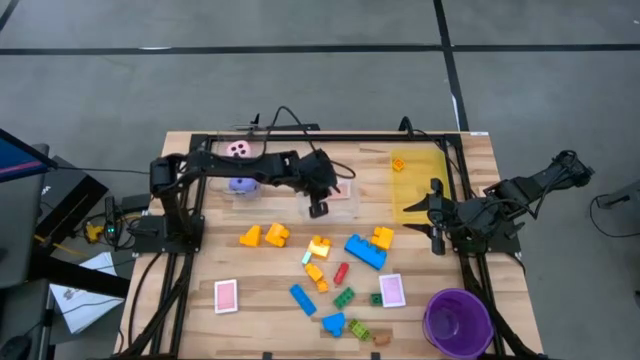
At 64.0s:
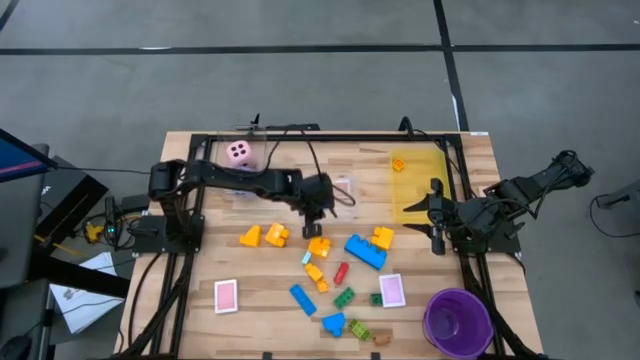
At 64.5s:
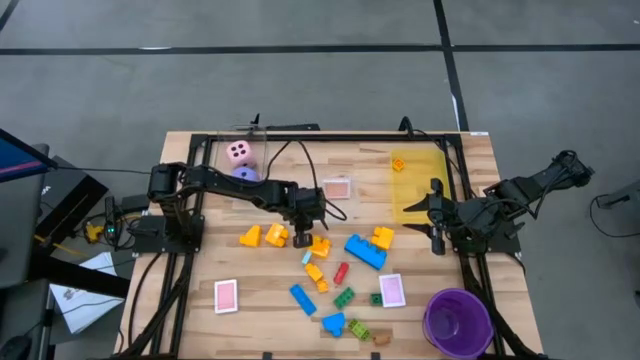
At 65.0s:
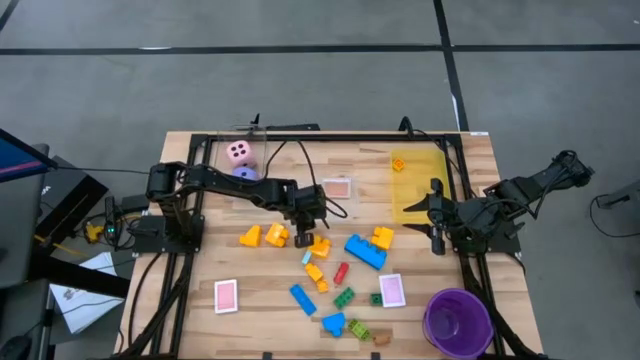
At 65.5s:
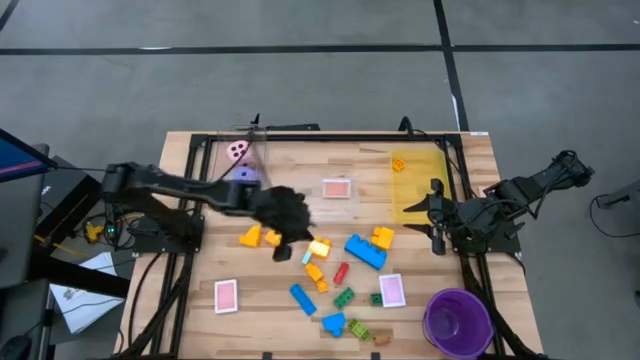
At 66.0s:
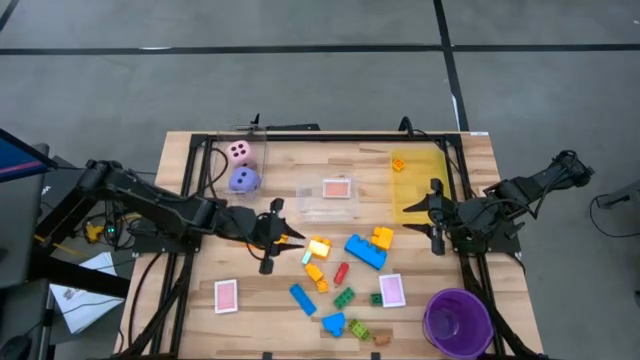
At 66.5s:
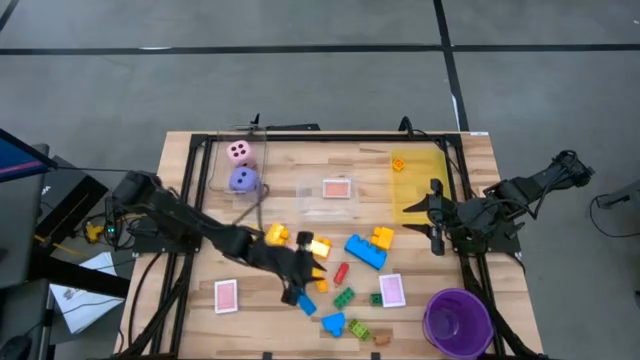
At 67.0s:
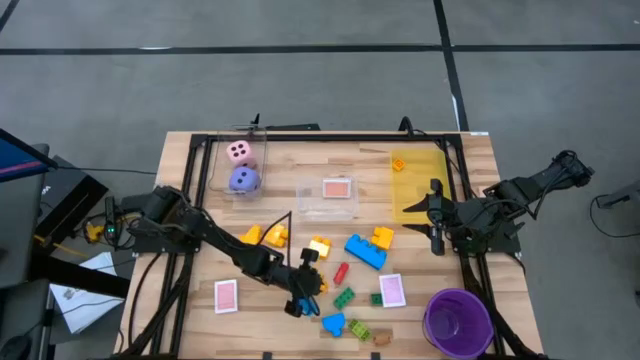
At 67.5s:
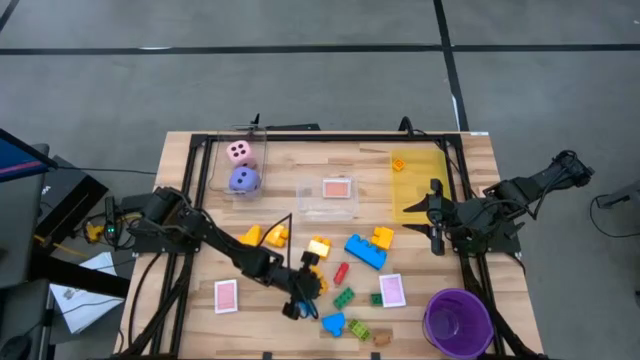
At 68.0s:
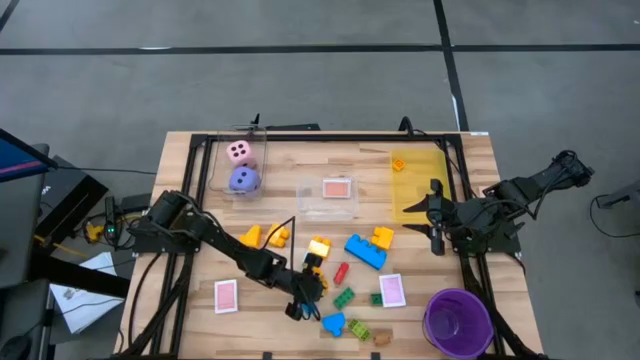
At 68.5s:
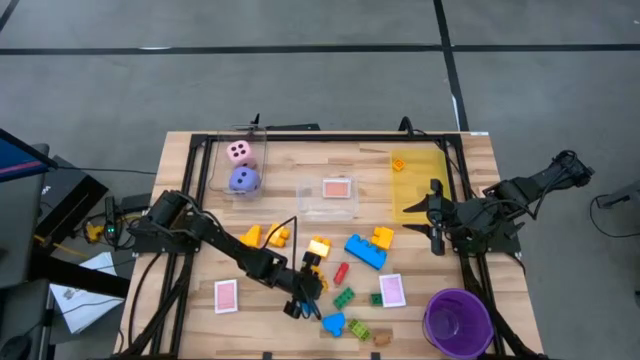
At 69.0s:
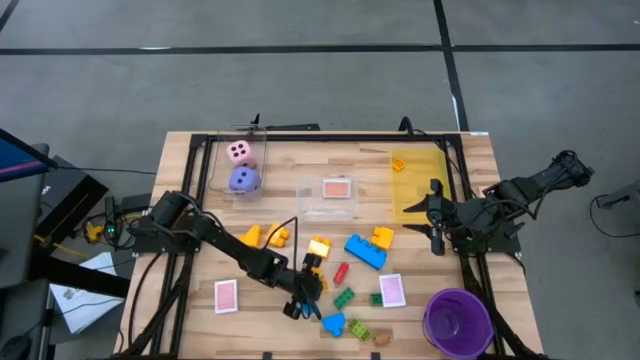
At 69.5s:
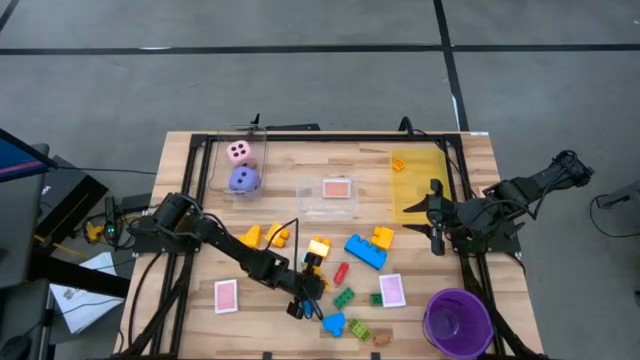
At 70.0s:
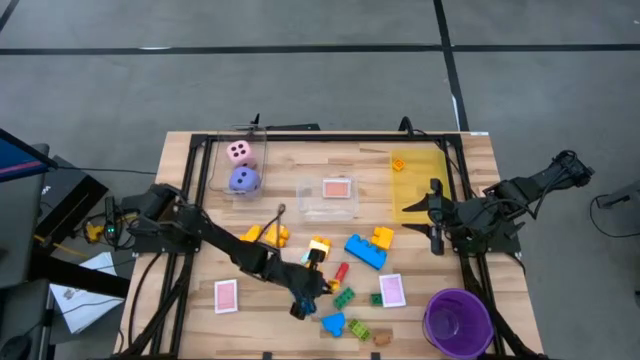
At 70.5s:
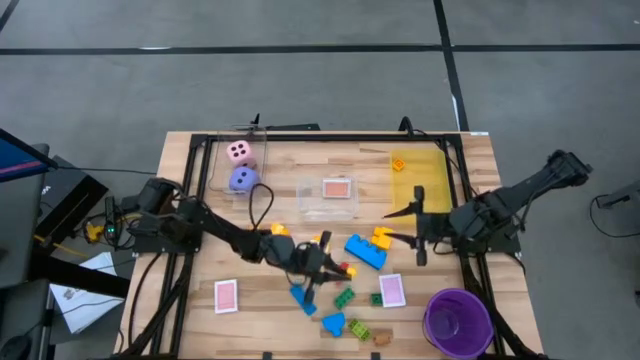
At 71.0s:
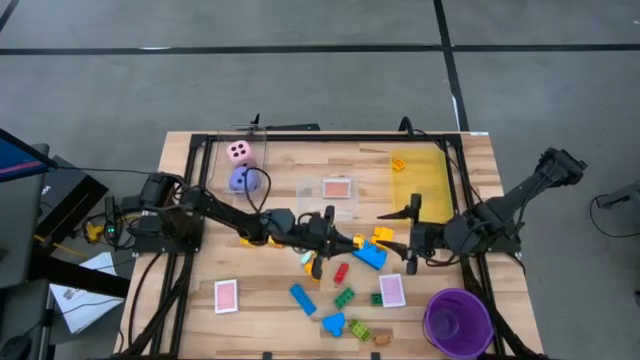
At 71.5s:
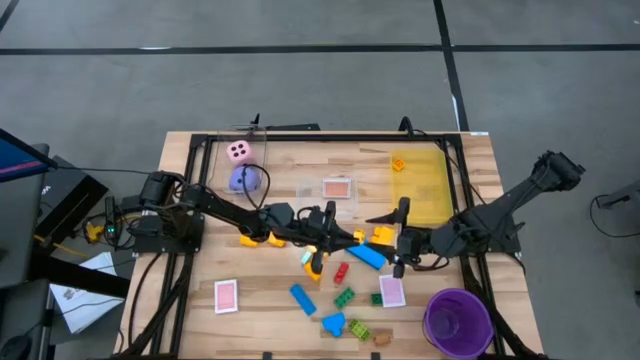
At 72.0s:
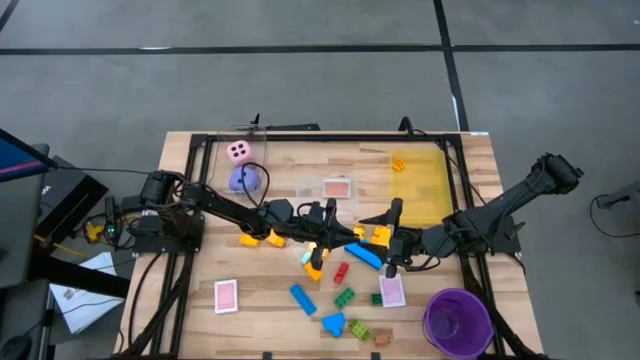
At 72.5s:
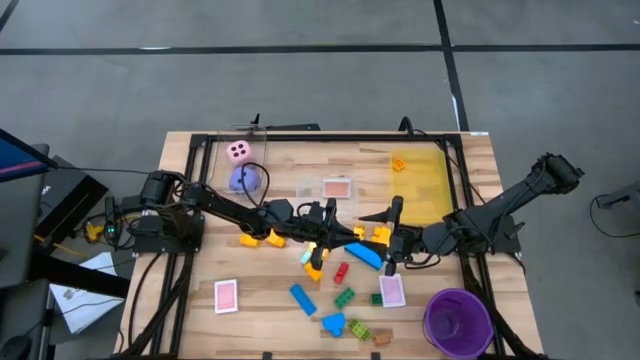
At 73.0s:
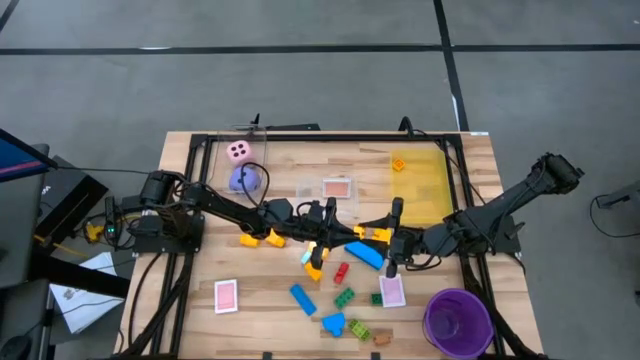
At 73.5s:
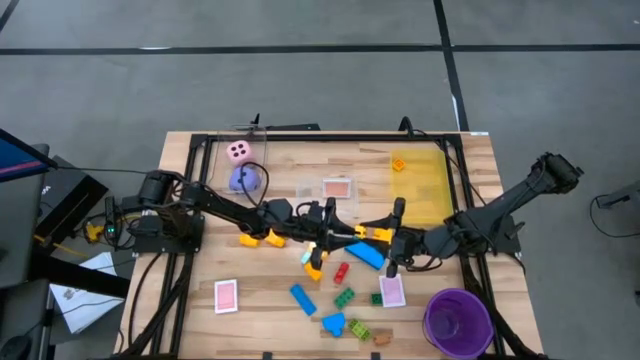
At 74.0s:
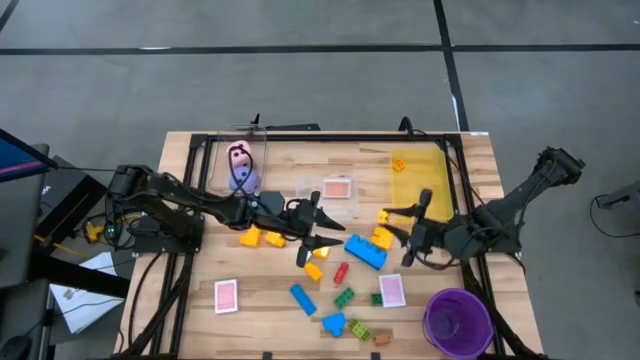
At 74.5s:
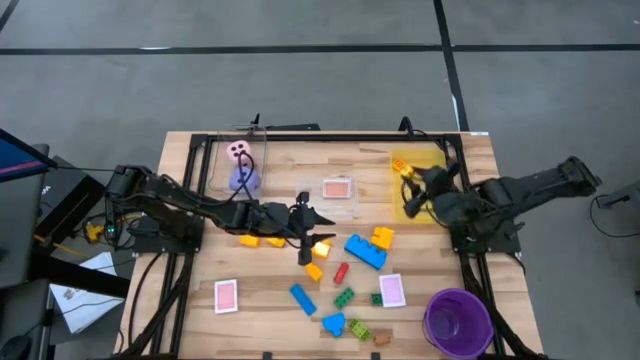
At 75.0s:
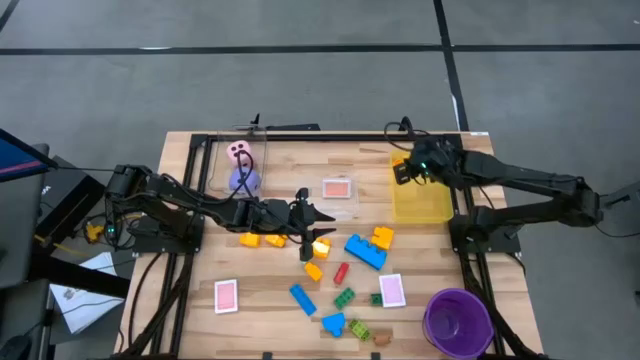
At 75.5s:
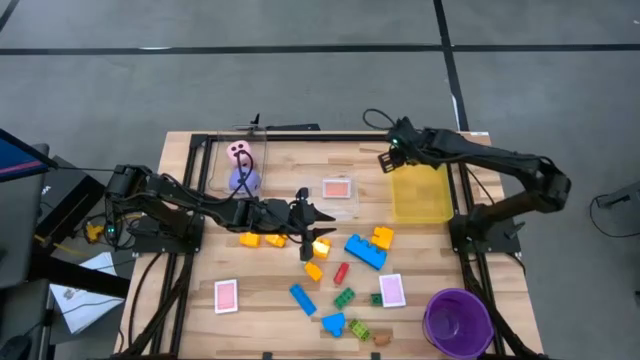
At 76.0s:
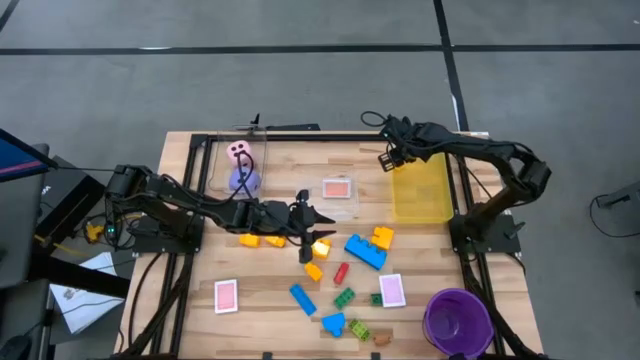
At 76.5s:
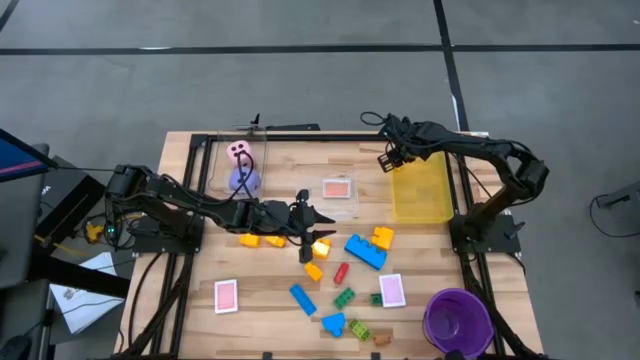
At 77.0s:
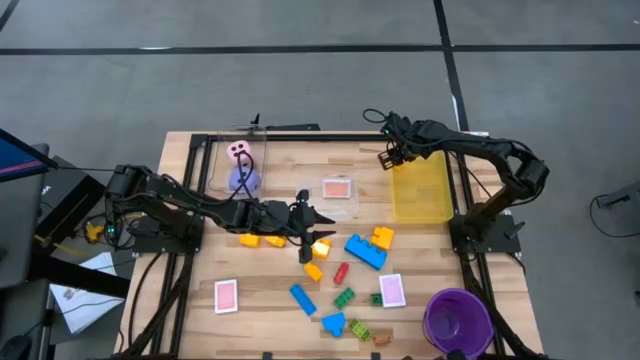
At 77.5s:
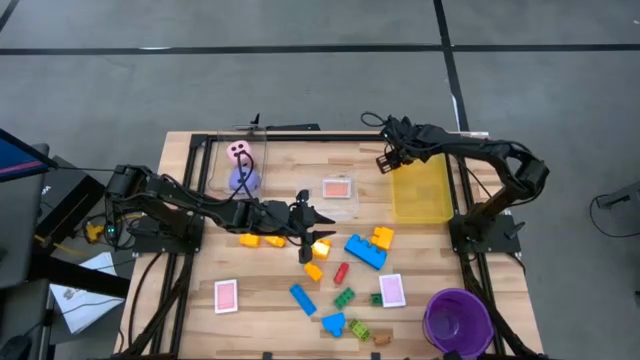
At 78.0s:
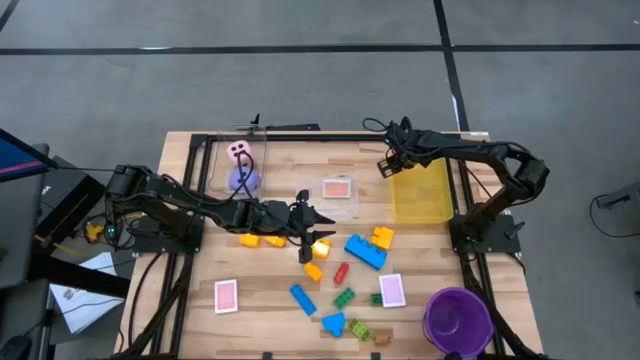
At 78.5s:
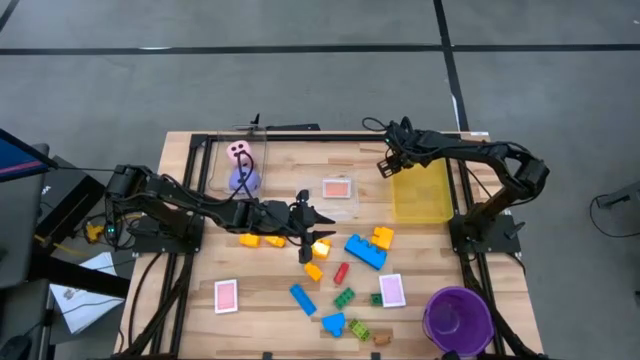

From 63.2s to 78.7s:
Task: Pick & Place Toys
Put the yellow game piece into the yellow bin

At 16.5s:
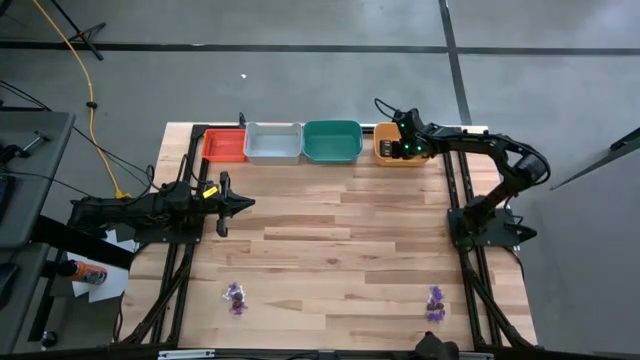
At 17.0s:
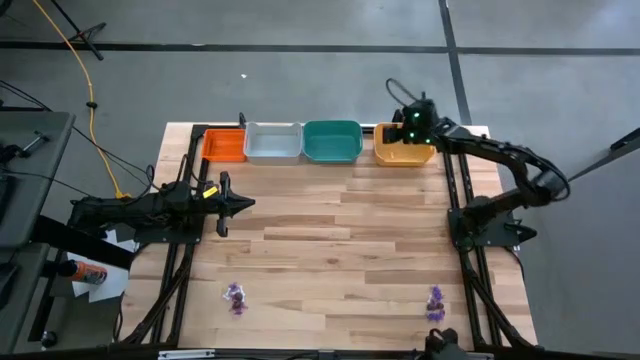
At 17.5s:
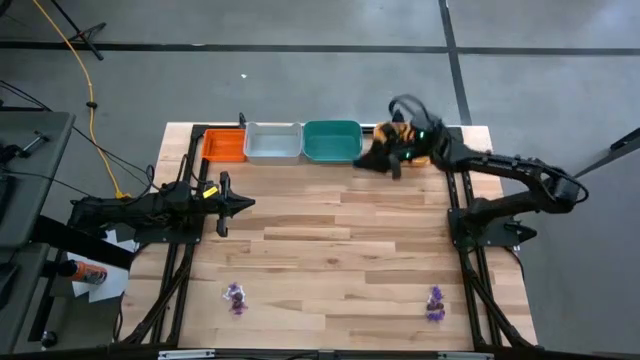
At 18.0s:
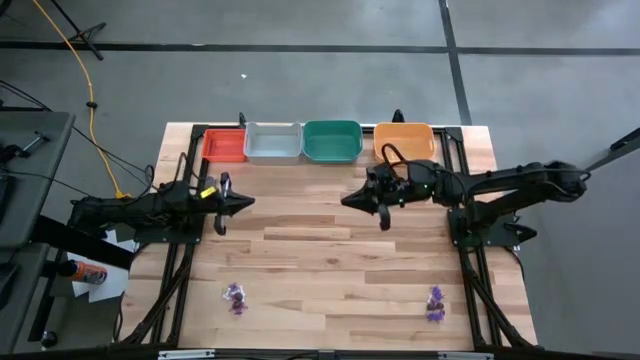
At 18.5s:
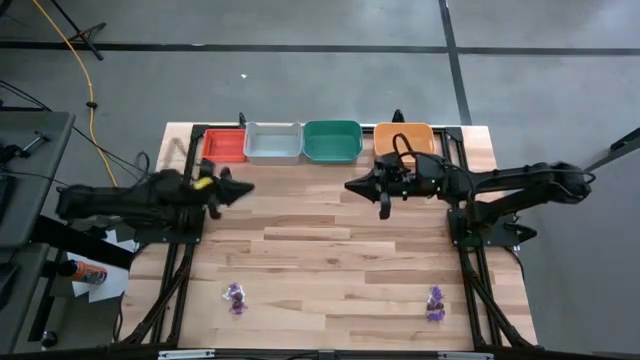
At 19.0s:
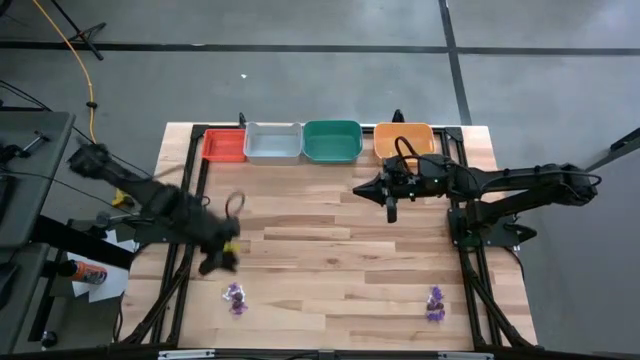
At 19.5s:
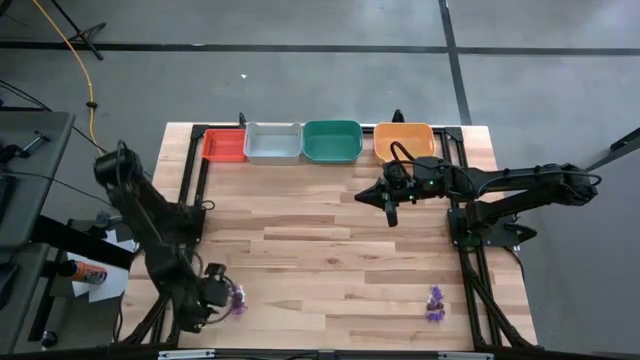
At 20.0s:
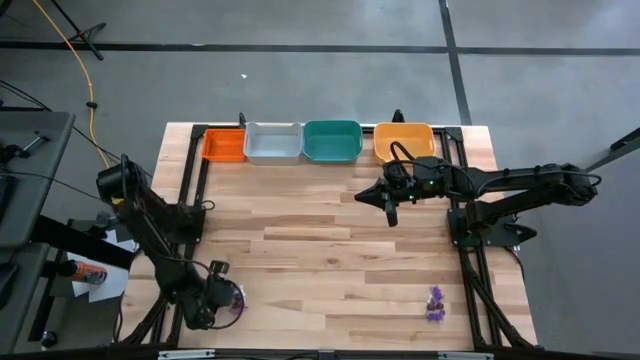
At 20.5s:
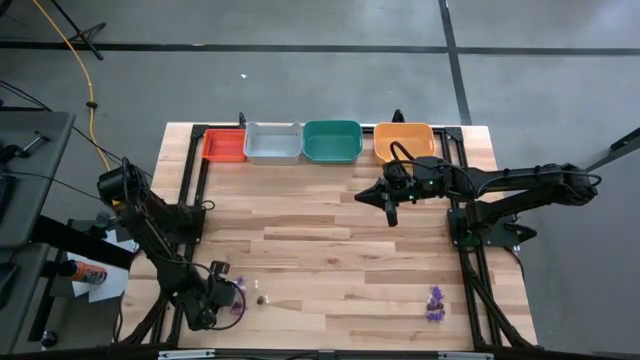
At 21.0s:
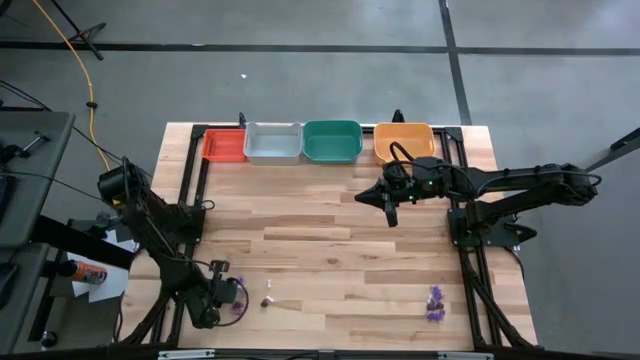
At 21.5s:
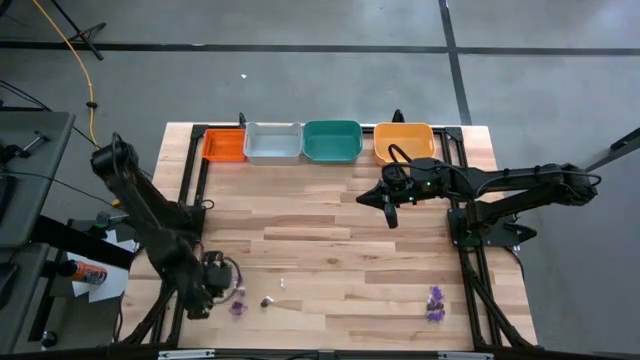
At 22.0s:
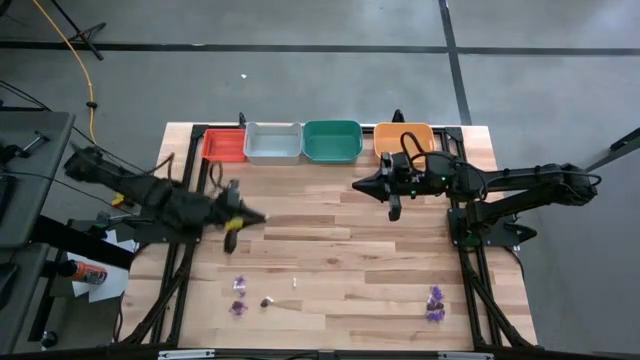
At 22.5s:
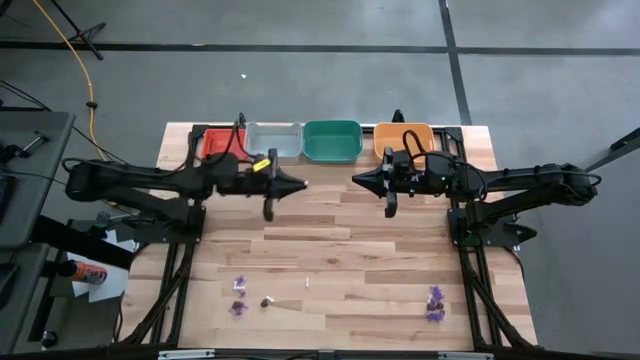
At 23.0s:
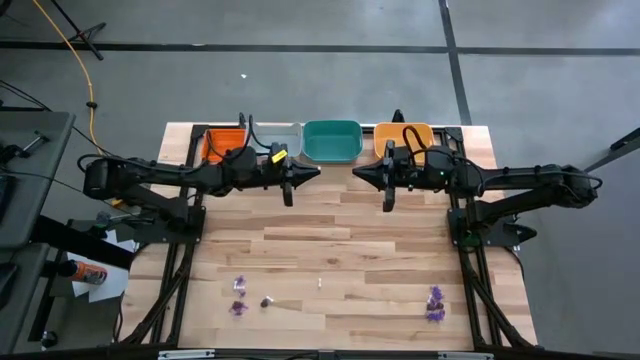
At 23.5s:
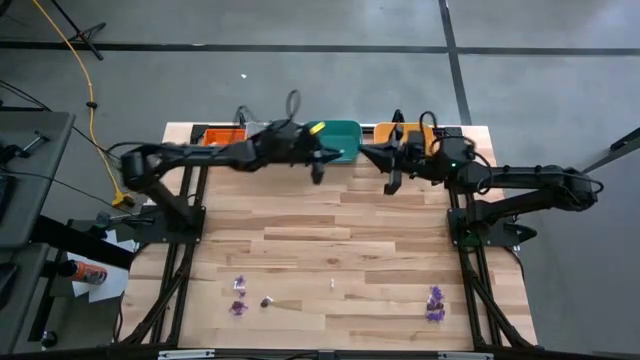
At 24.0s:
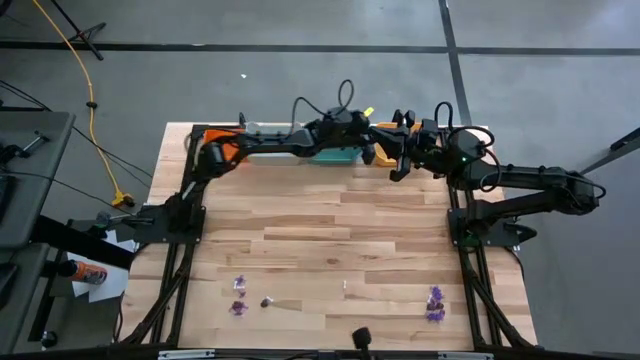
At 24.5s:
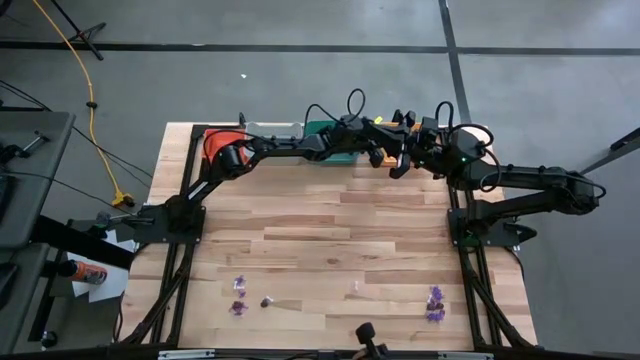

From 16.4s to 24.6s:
Task: Sort Halloween decoration
Put the white bone into the yellow bin
